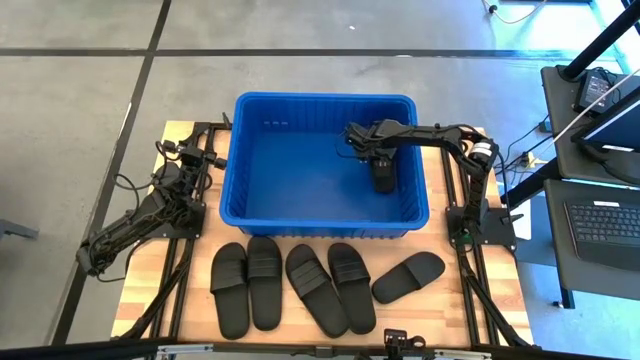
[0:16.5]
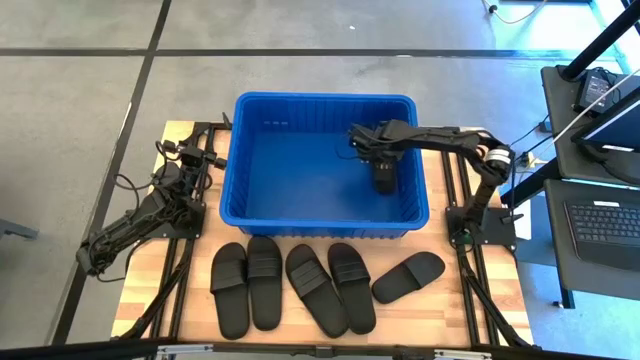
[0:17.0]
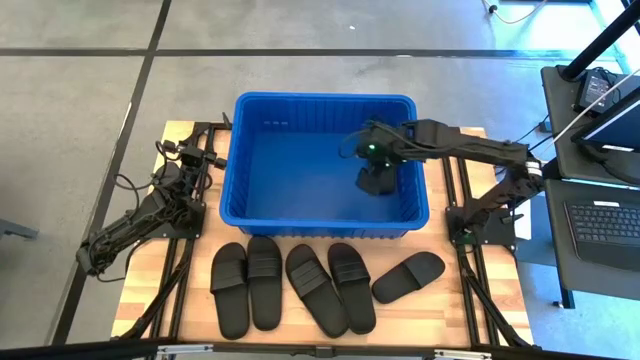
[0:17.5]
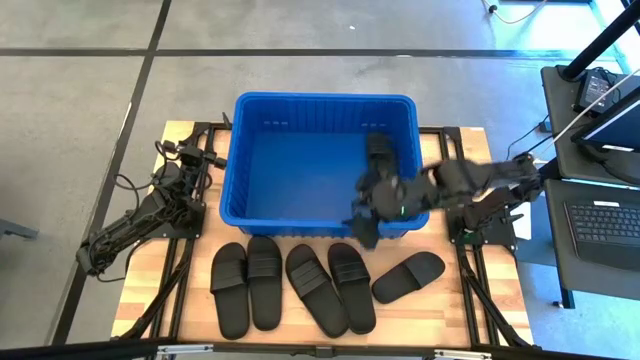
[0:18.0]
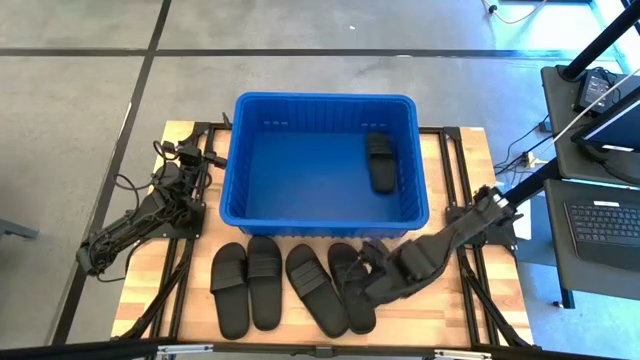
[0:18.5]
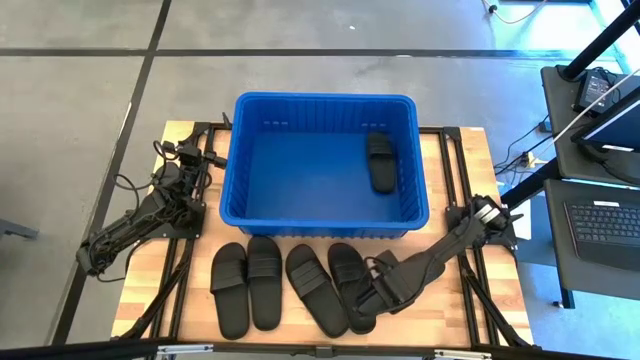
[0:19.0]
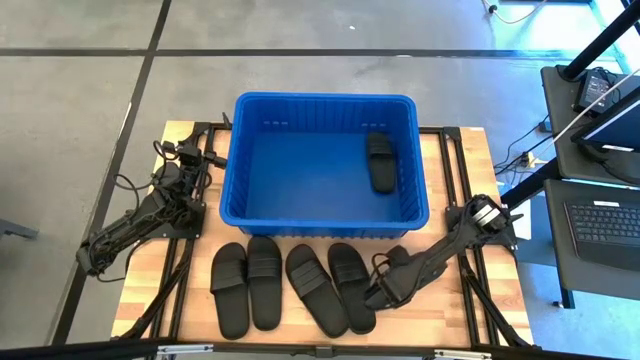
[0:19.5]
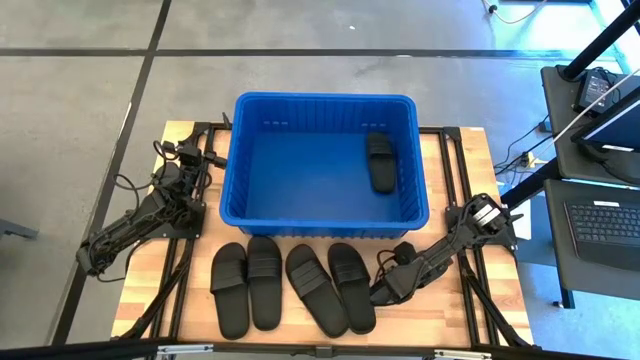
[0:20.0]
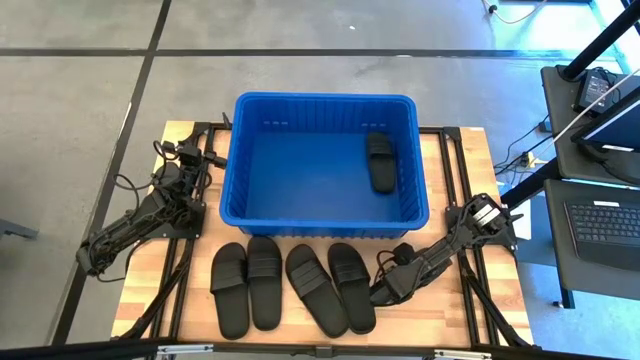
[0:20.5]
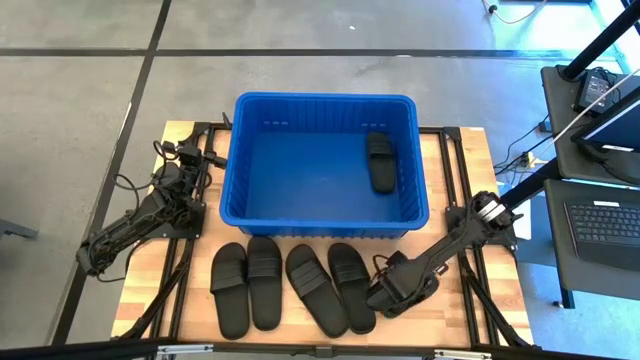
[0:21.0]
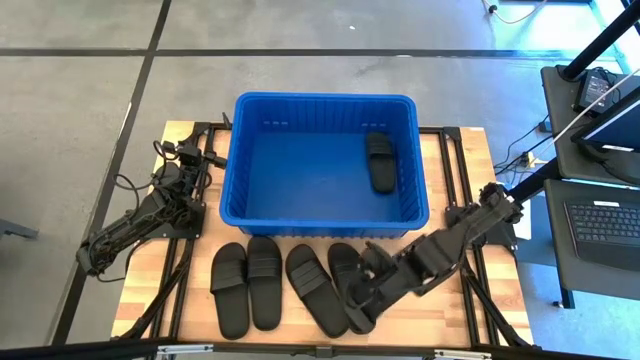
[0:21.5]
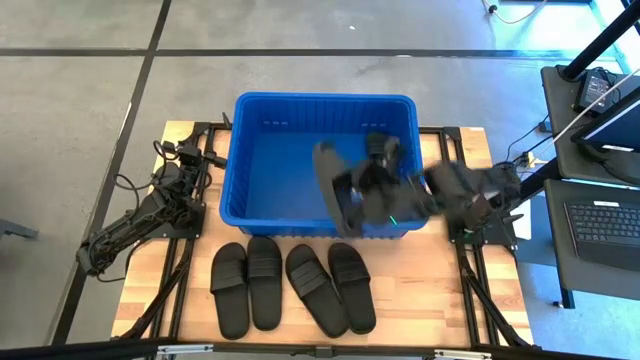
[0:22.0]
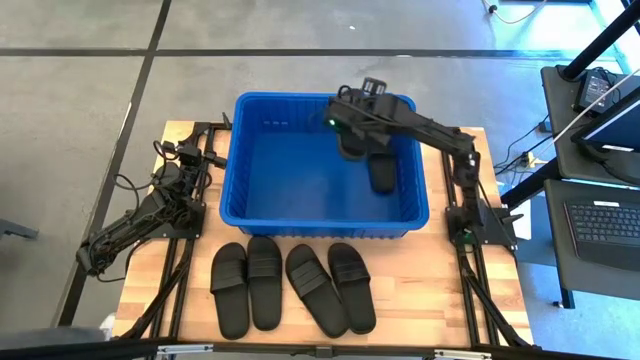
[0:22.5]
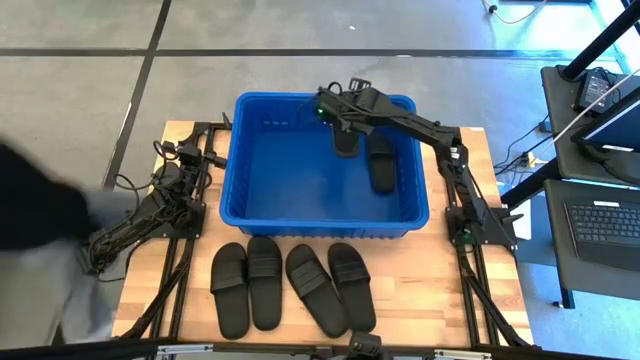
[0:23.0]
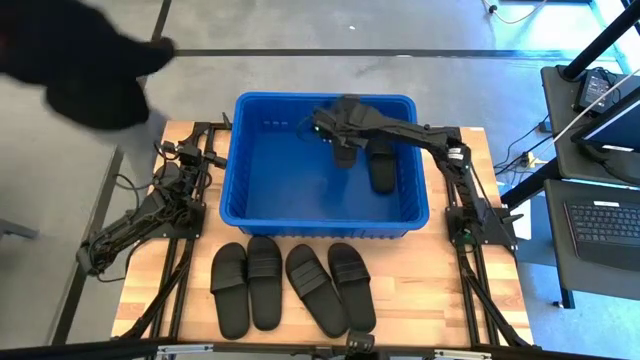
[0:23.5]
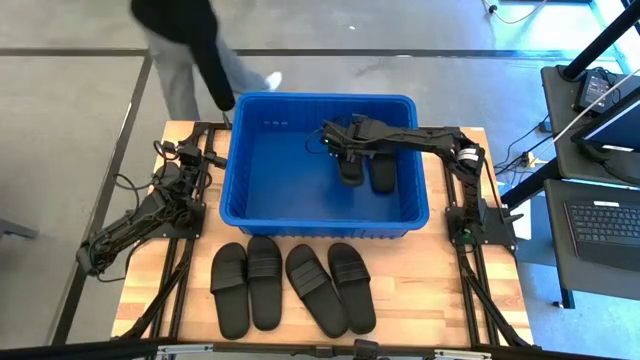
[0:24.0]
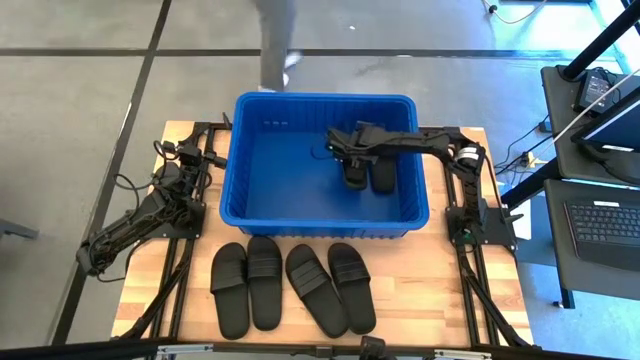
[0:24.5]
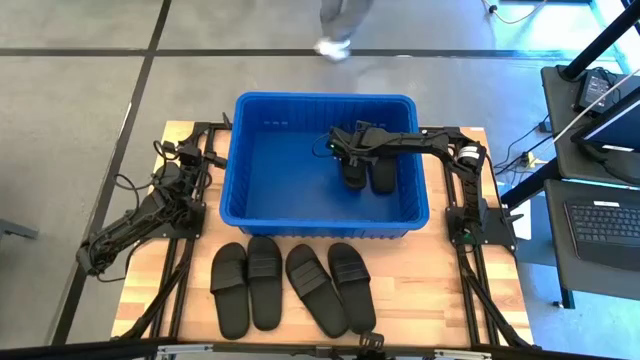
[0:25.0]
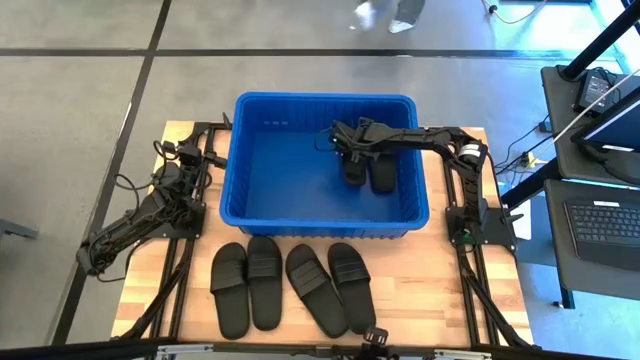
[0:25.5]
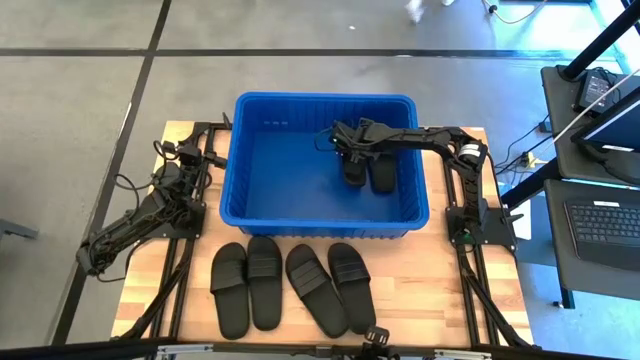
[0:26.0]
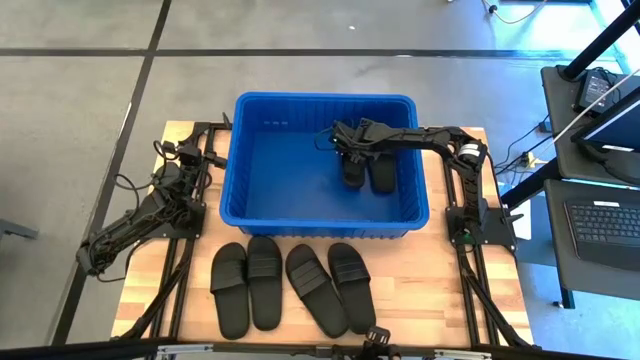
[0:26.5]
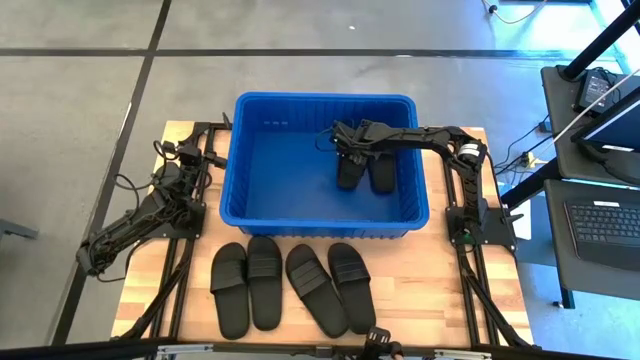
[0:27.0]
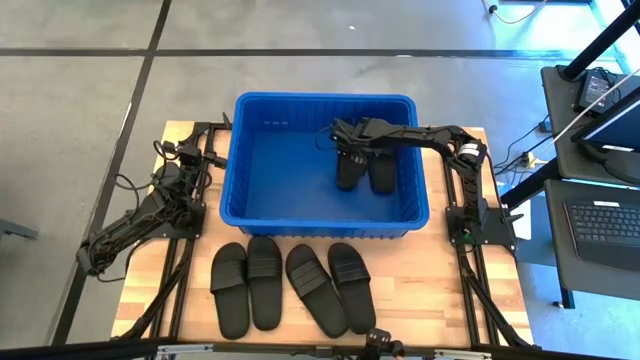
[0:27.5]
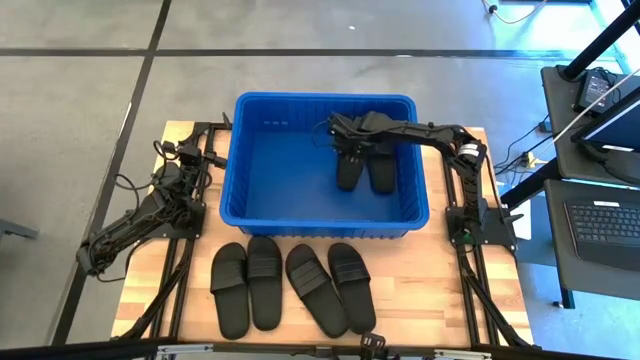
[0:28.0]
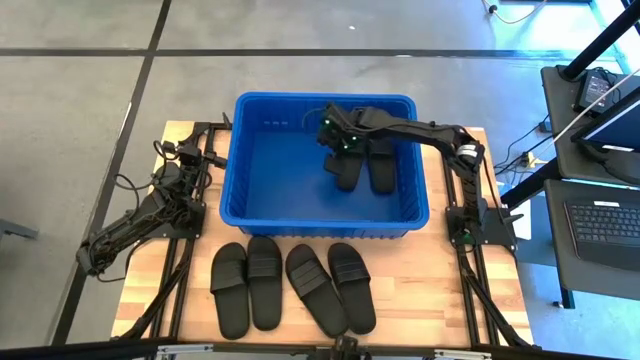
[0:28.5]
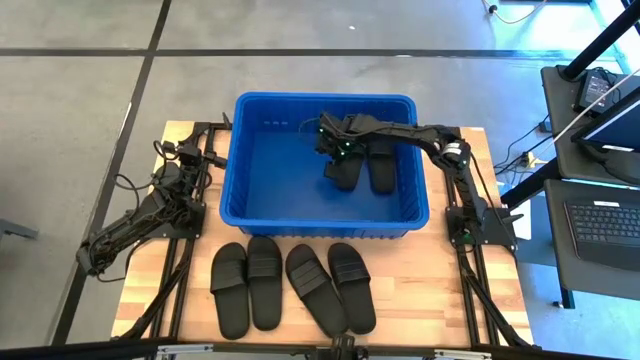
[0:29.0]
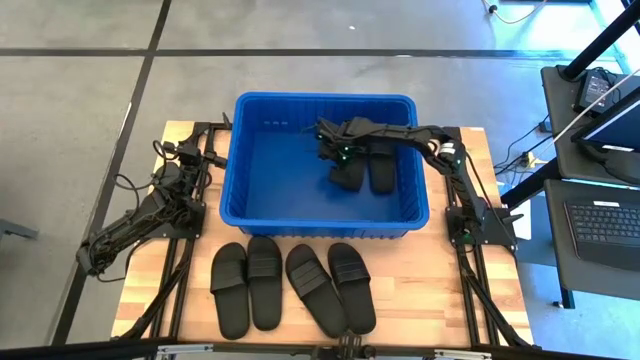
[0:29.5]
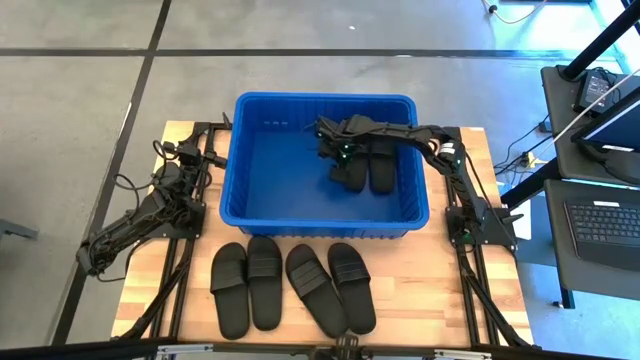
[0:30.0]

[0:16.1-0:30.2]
Task: Pick and place slides into bin
Put the black slide into the blue organizer bin

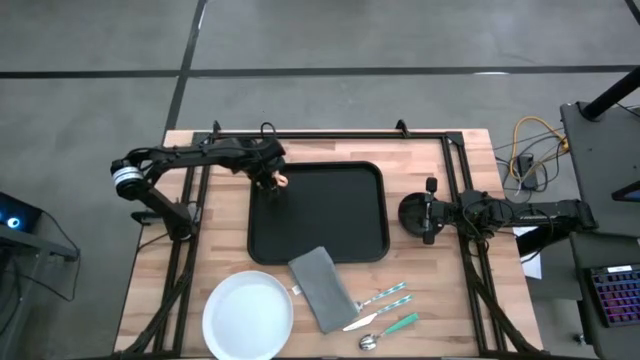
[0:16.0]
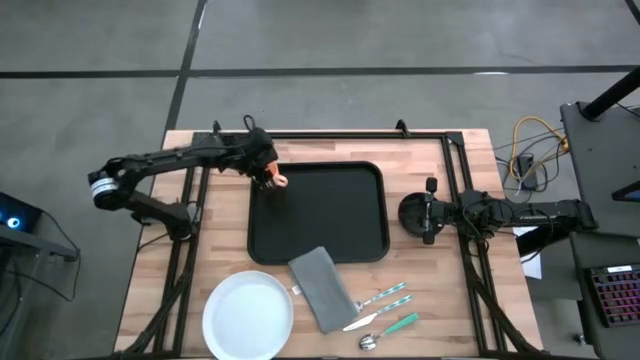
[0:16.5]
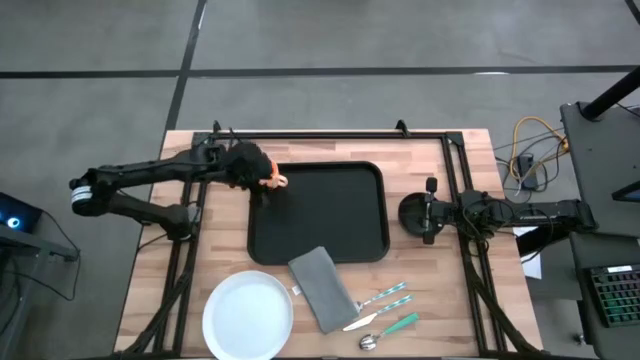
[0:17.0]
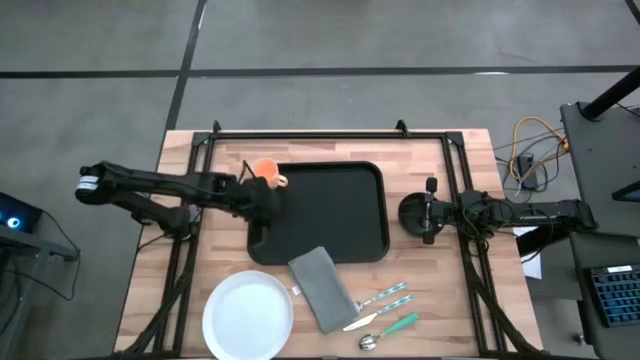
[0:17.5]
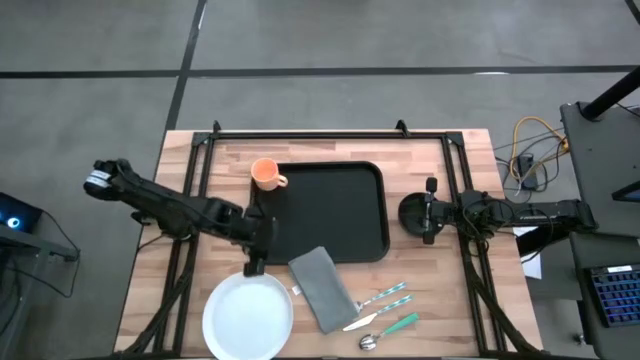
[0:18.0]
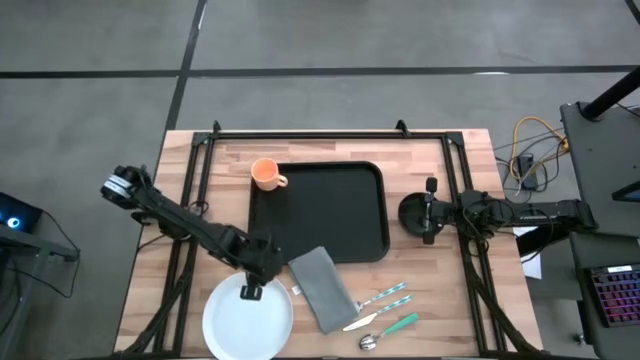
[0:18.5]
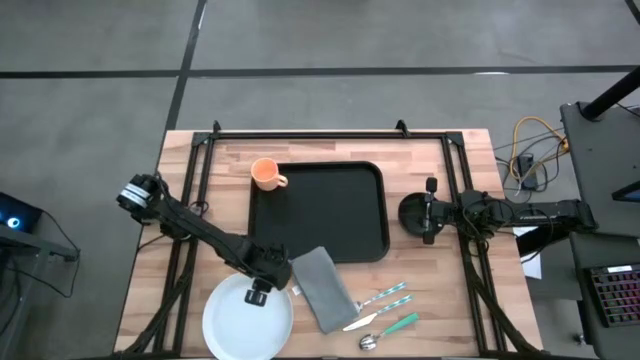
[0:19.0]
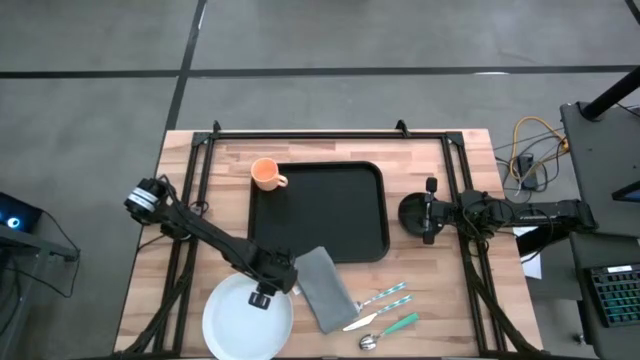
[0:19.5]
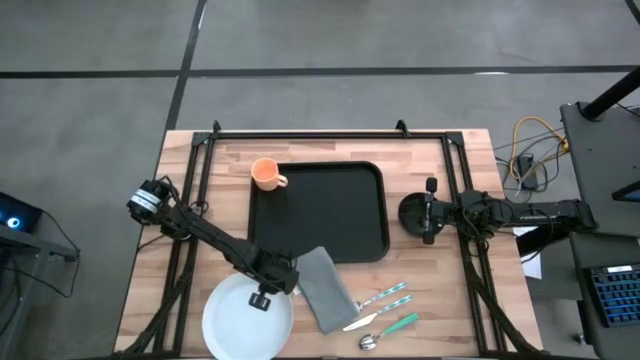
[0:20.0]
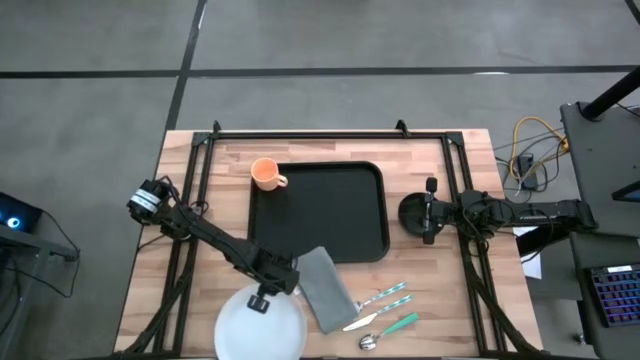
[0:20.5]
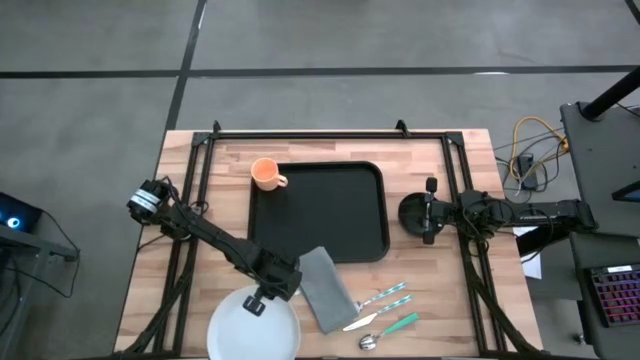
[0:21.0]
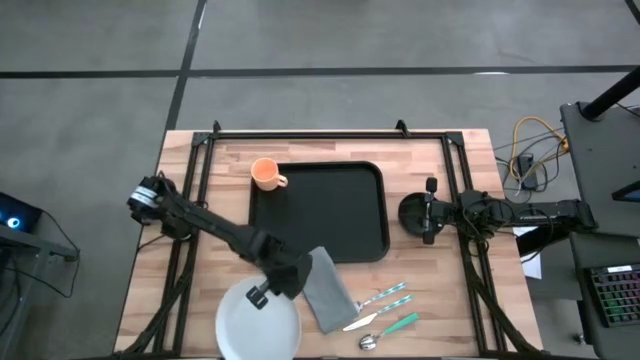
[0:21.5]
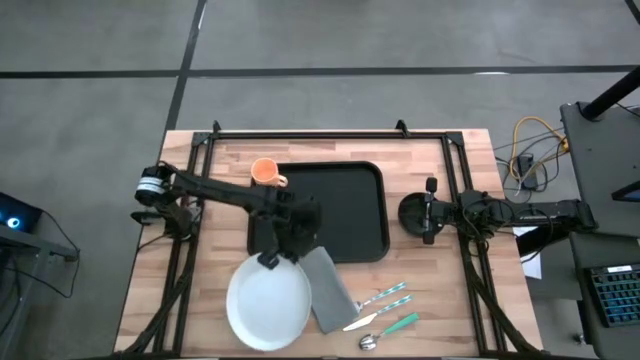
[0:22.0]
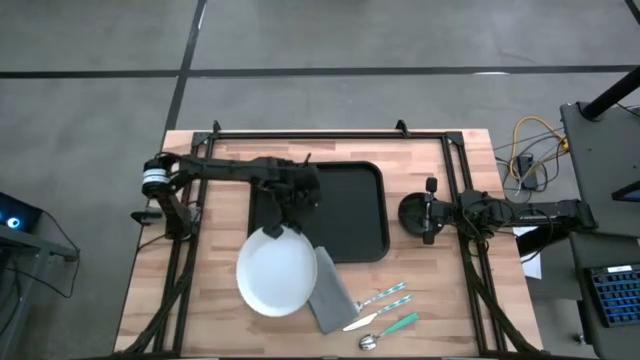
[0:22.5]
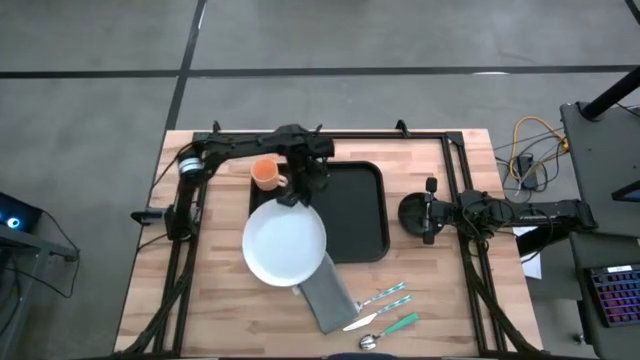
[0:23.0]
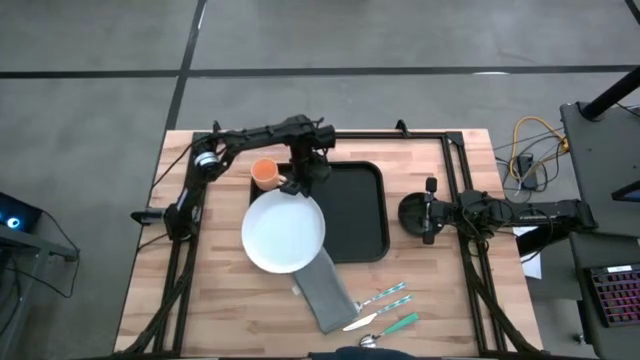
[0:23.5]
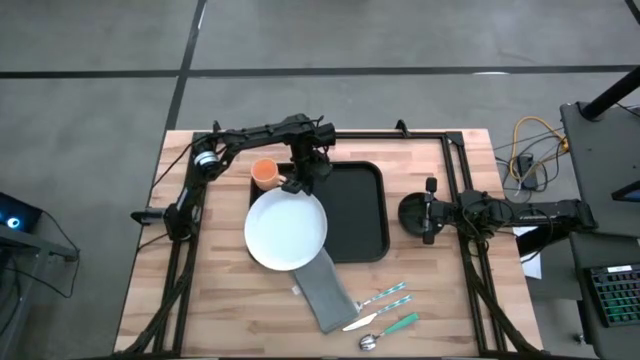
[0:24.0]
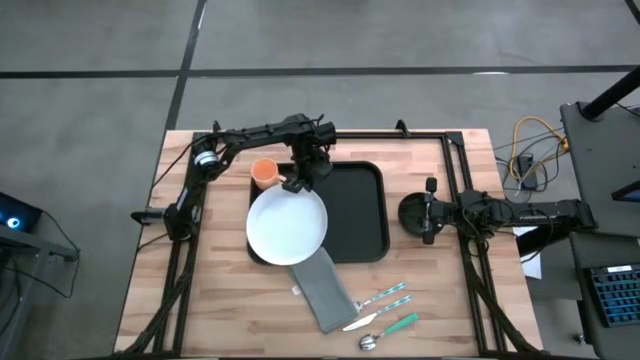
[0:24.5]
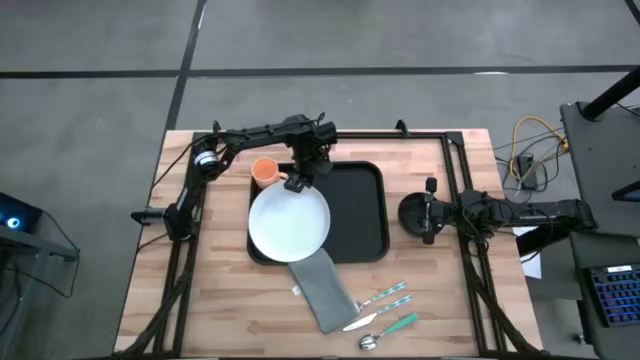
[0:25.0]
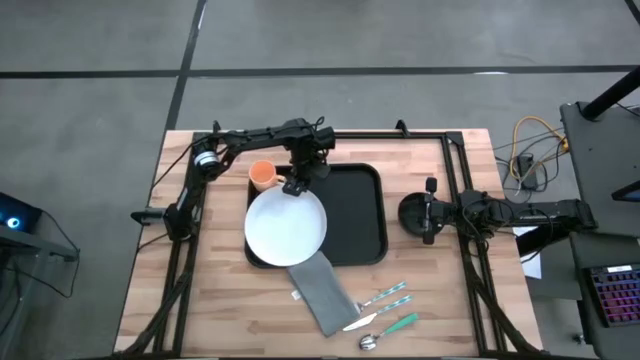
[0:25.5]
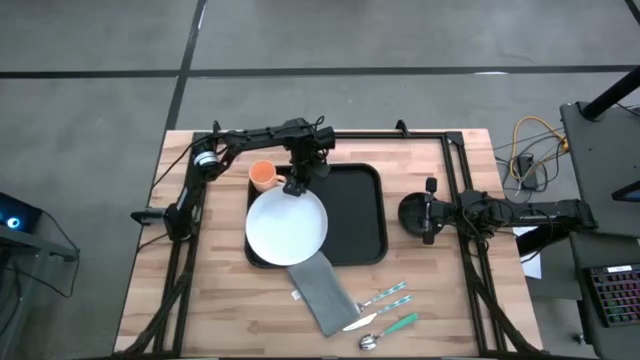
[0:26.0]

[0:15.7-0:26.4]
Task: Set up tray
Put the white plate on the black tray
